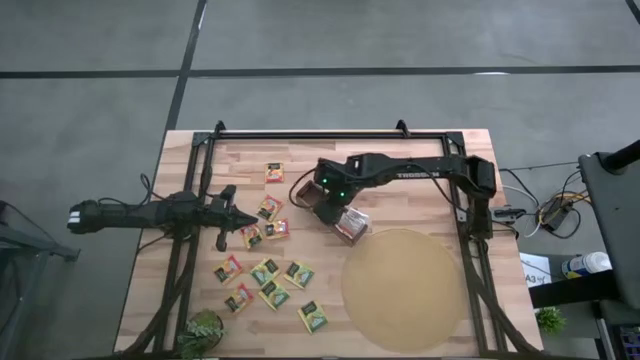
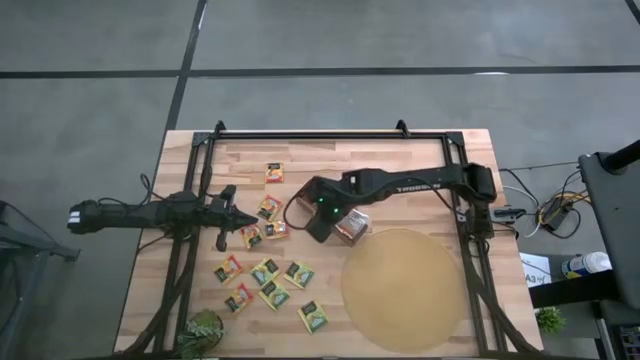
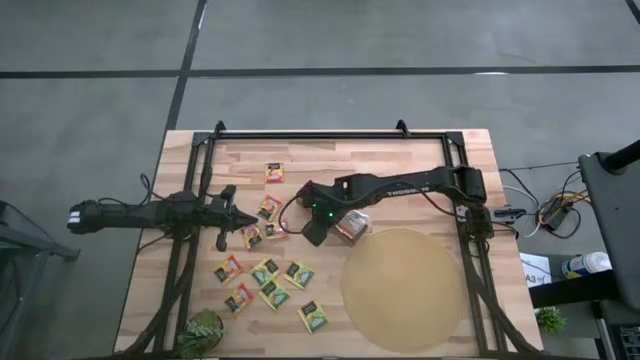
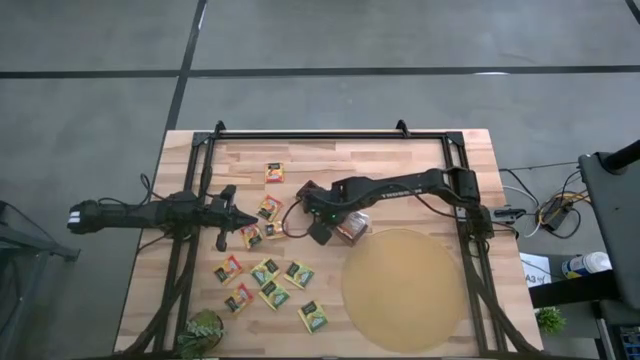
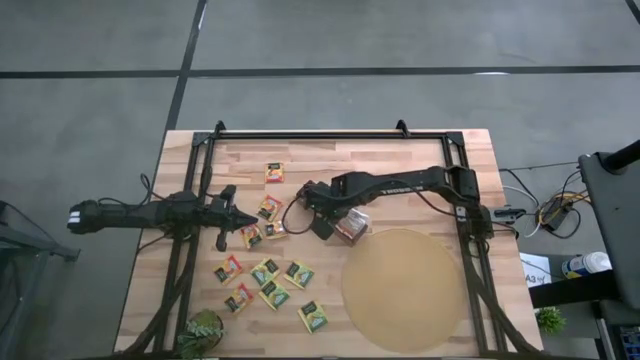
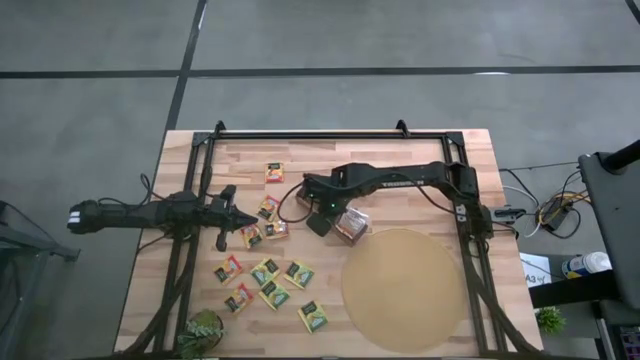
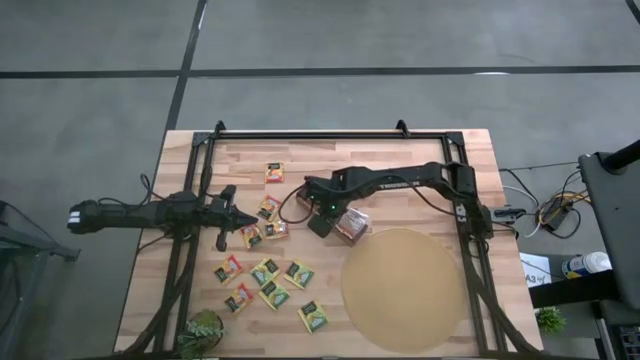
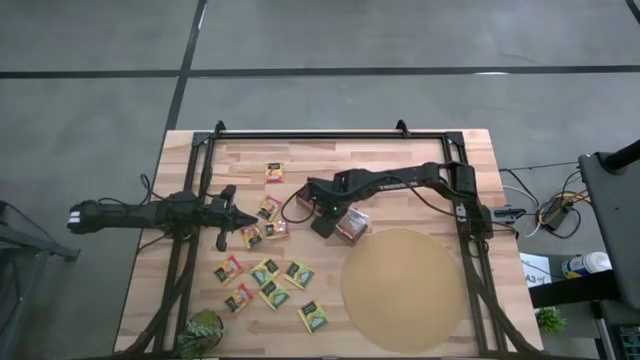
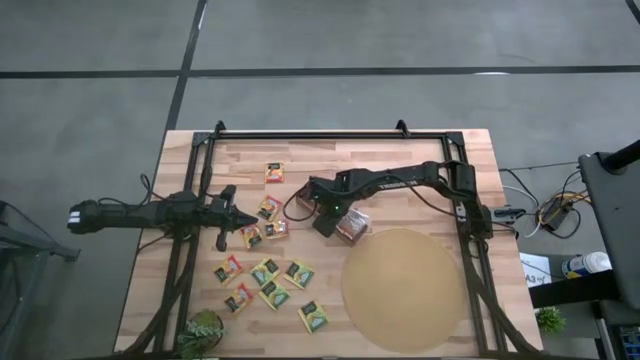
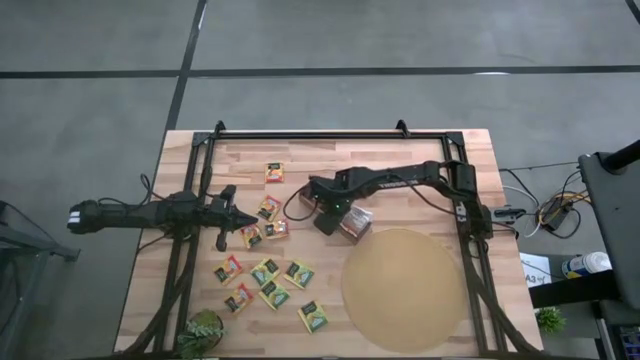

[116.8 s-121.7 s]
Task: Pick & Place Tea
Adjust the yellow tea bags in the wooden organizer

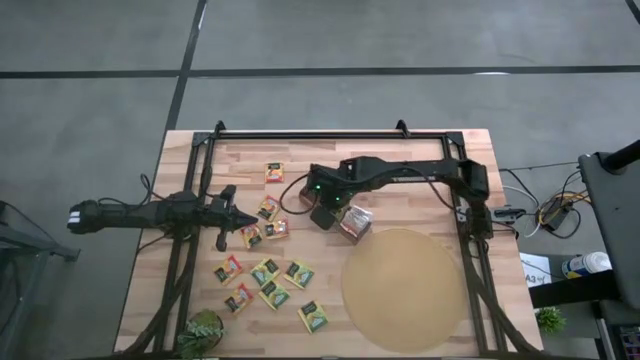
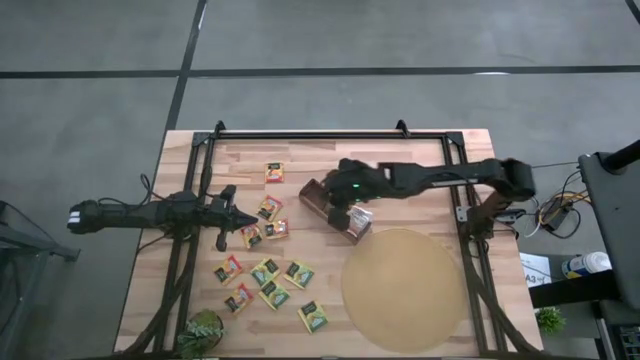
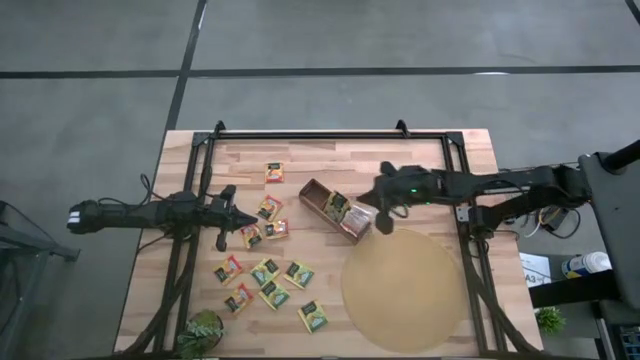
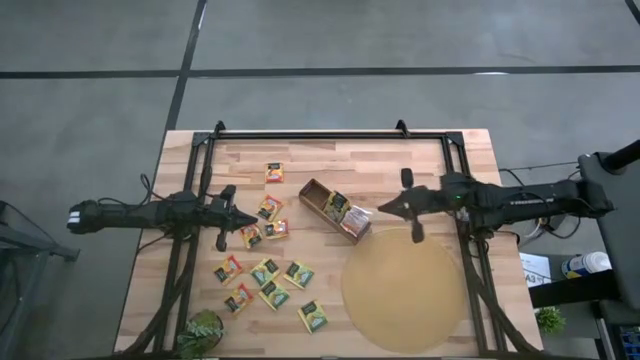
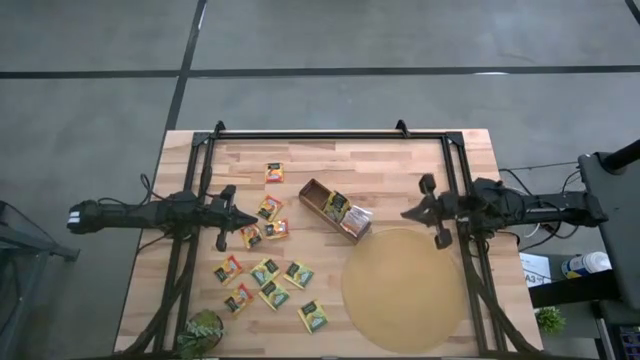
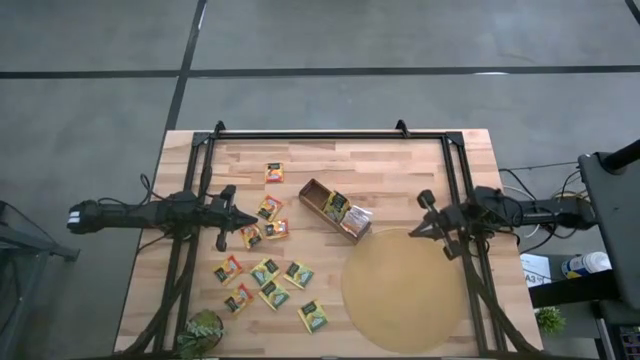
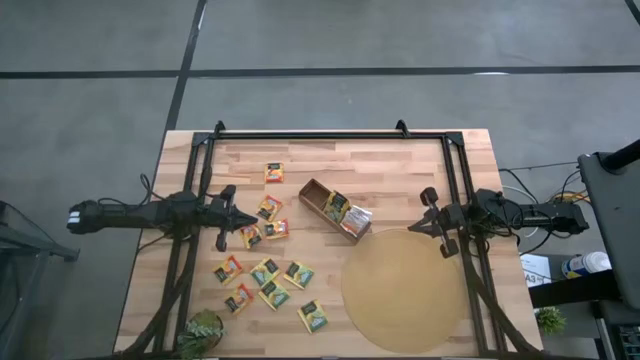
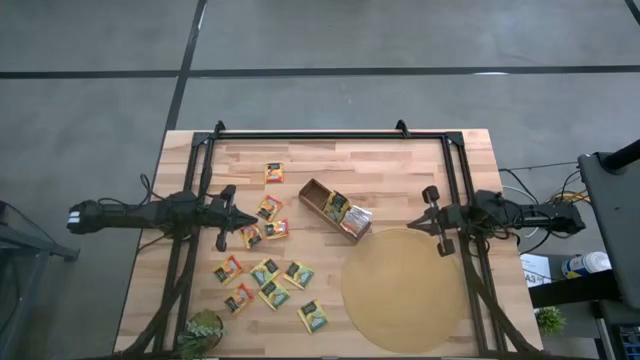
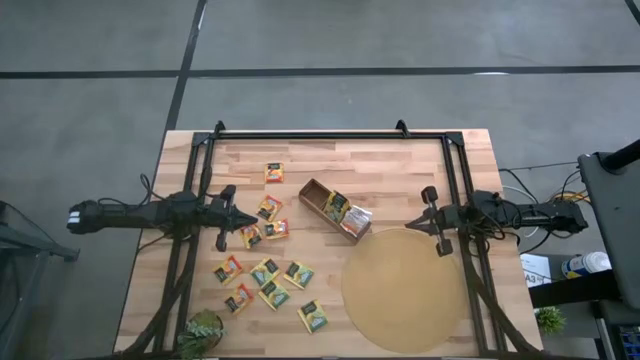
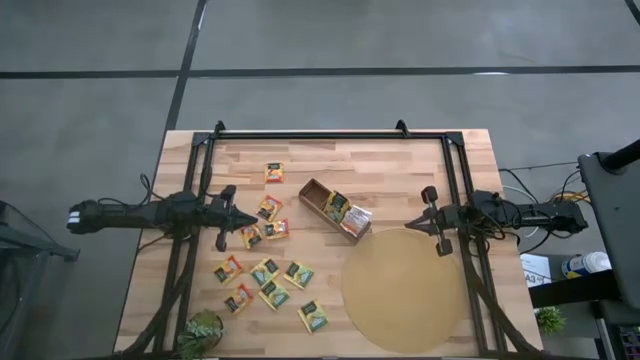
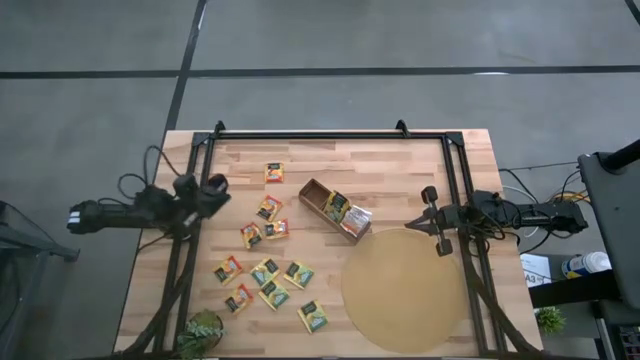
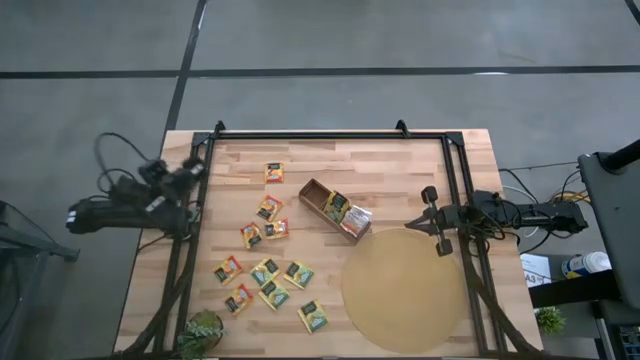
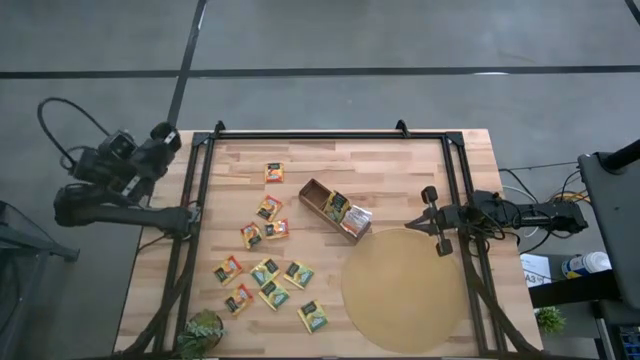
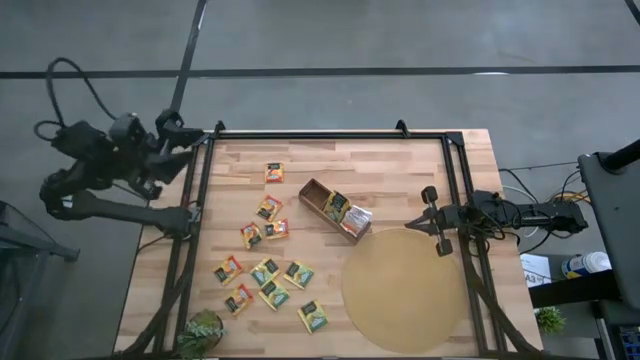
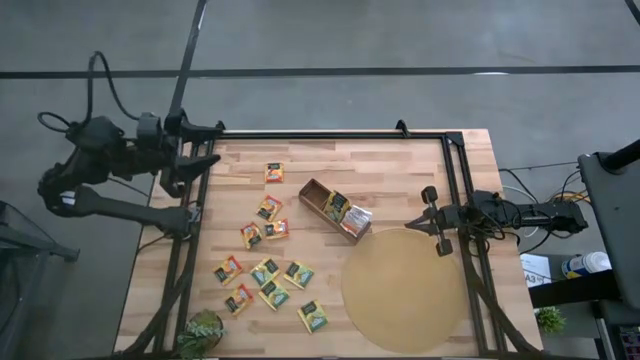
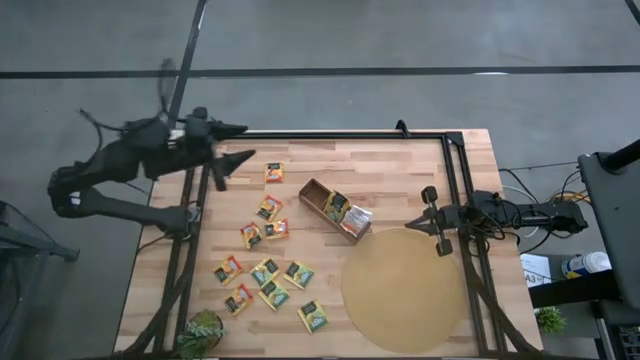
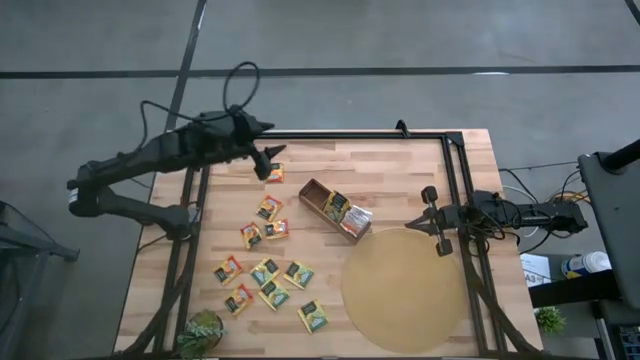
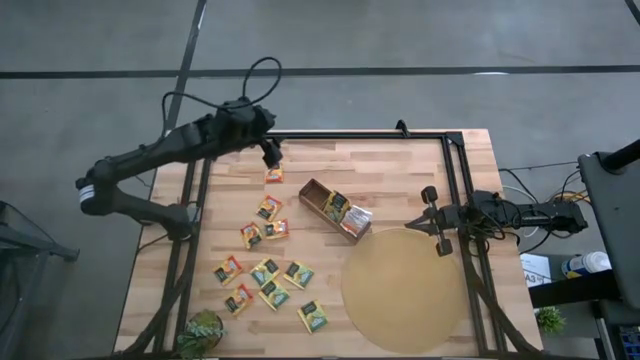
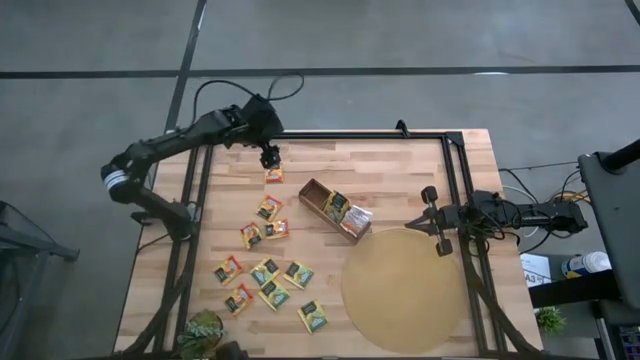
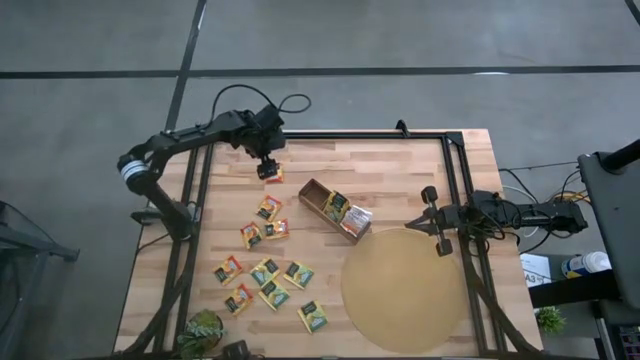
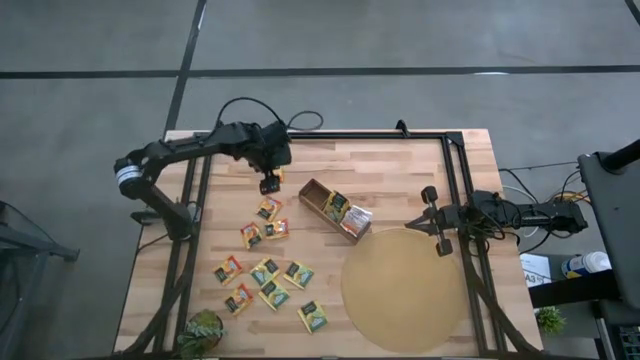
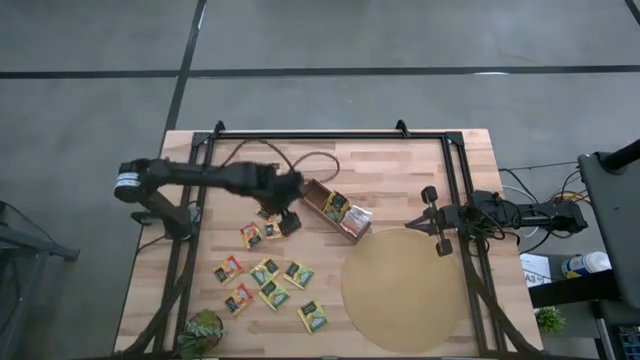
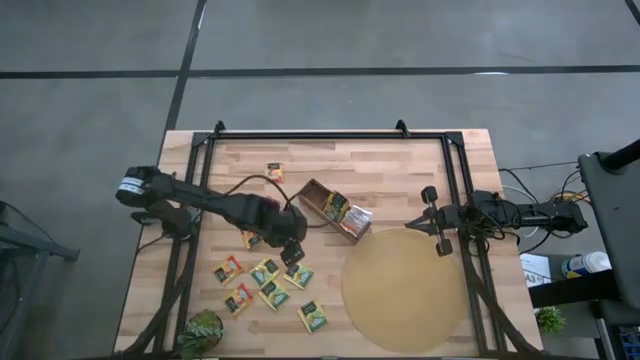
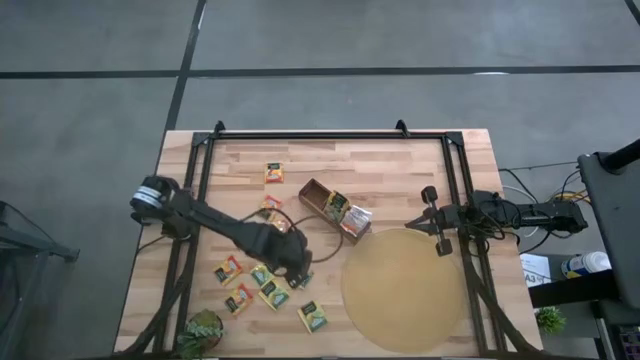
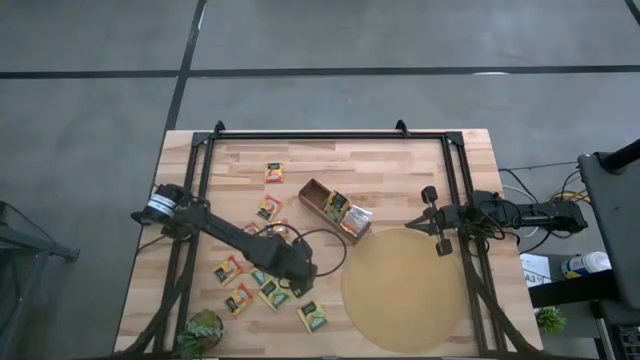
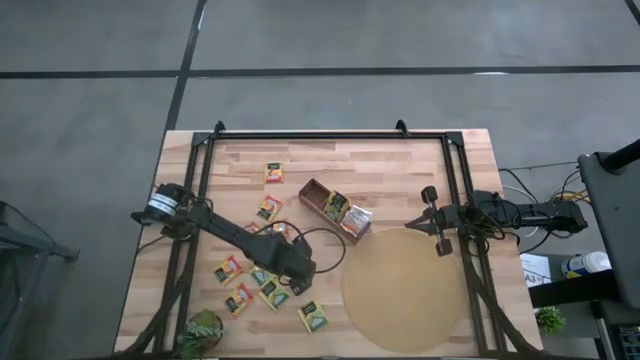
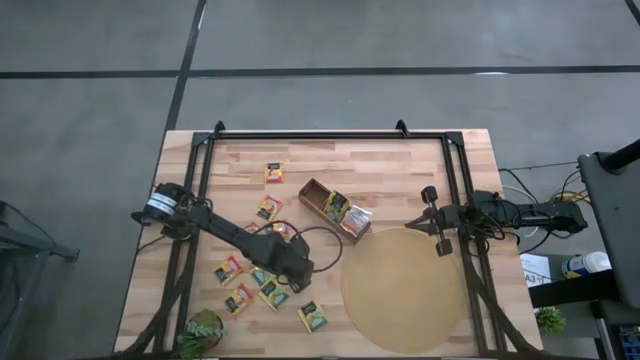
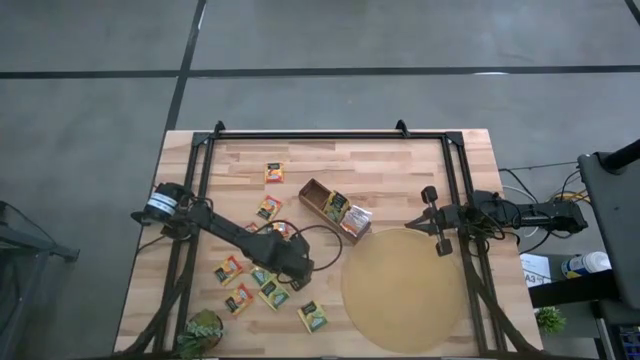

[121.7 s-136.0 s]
Put the yellow tea bag into the middle section of the wooden organizer

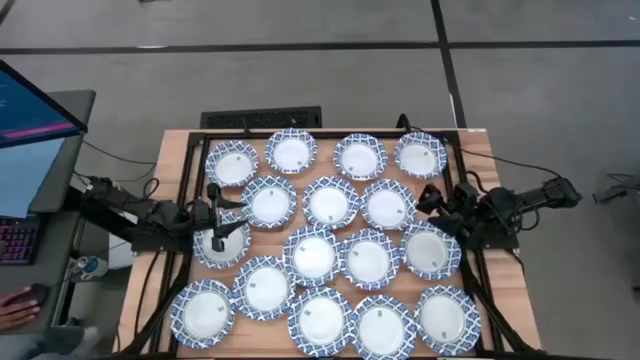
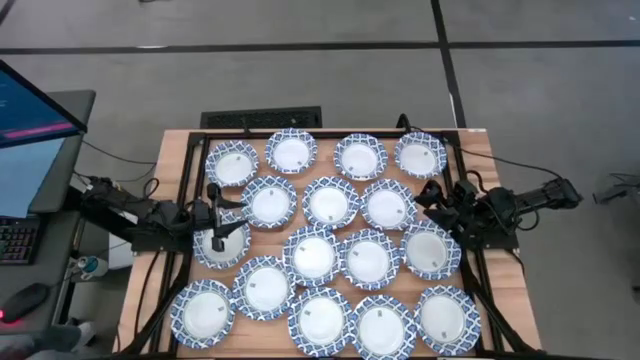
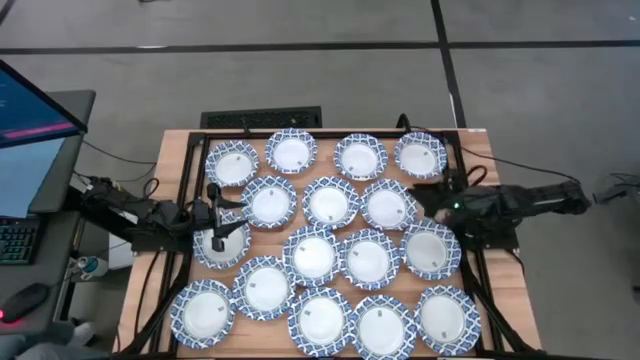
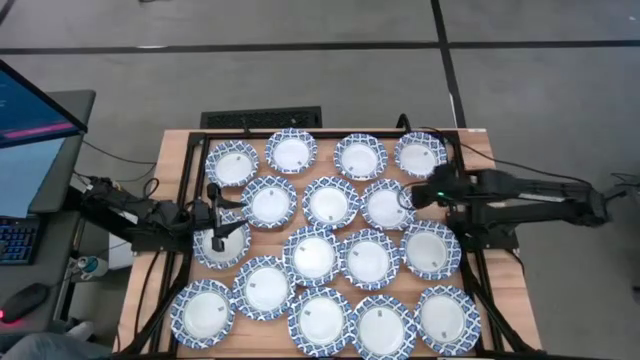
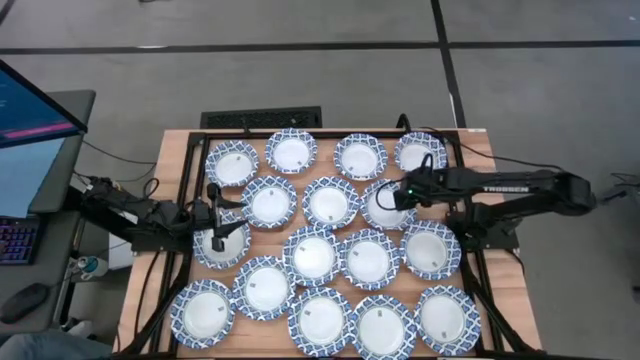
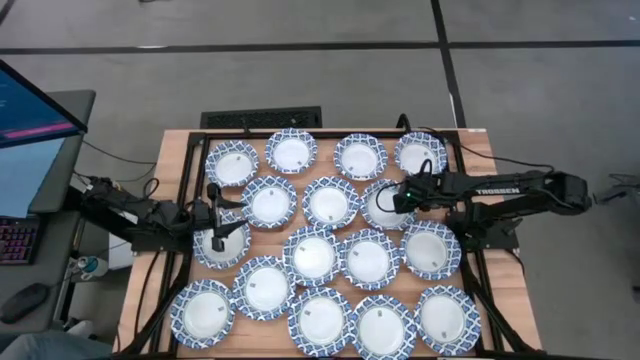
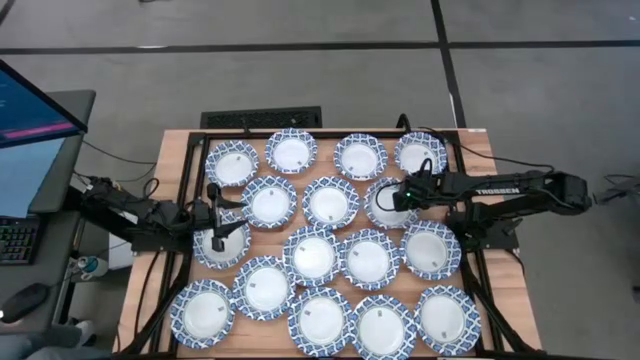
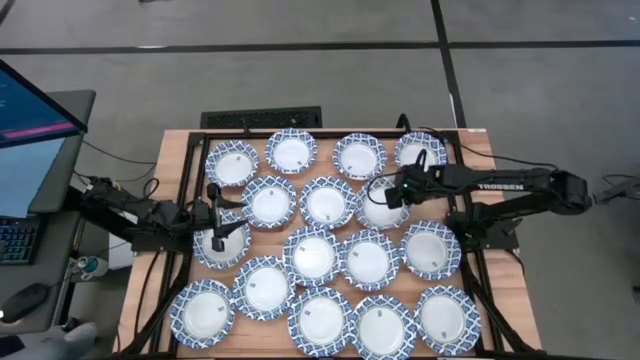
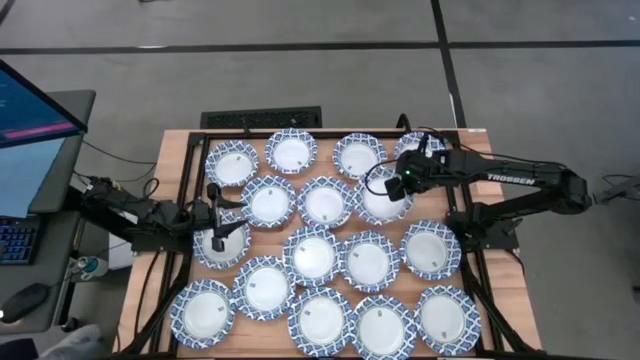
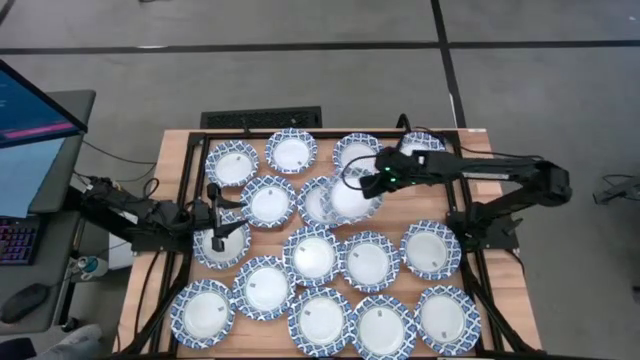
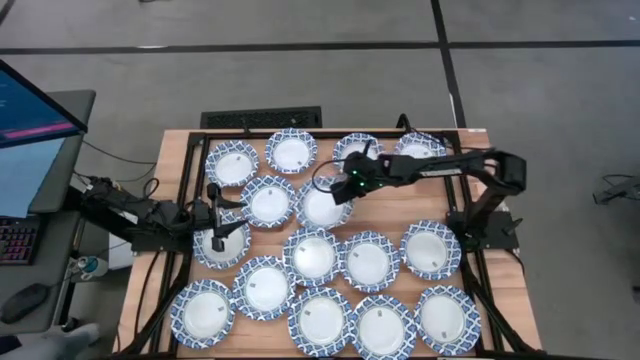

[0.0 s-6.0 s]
Task: Nest bowls inside each other
Stack the white bowl on the white bowl
